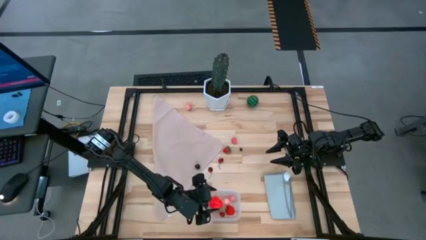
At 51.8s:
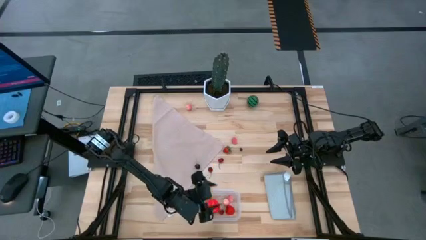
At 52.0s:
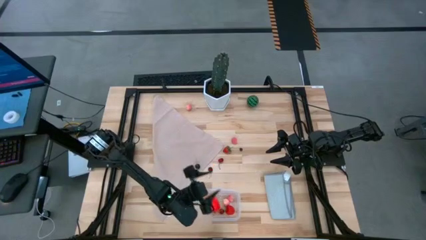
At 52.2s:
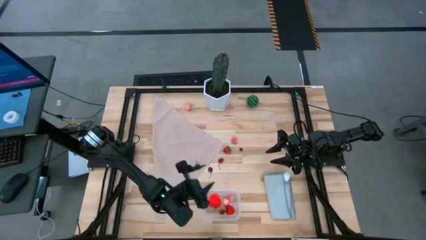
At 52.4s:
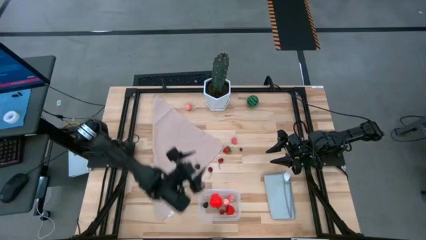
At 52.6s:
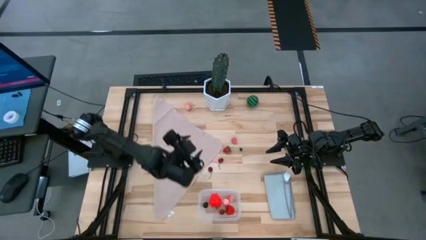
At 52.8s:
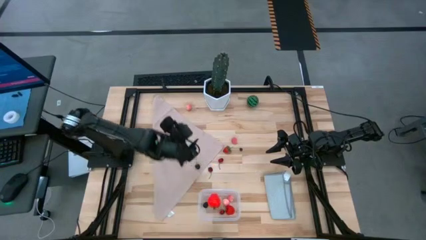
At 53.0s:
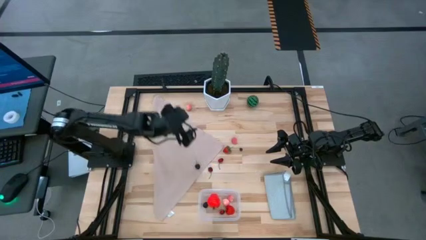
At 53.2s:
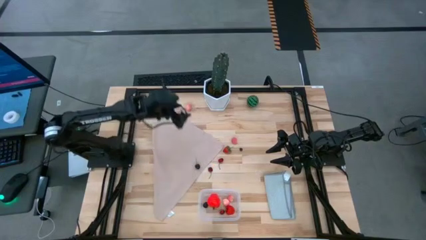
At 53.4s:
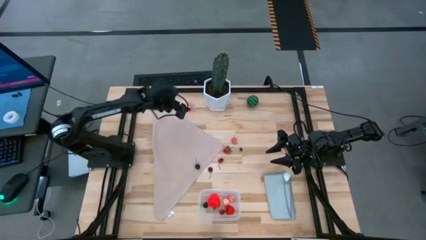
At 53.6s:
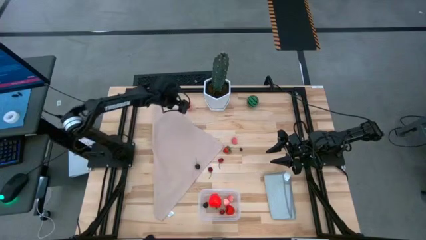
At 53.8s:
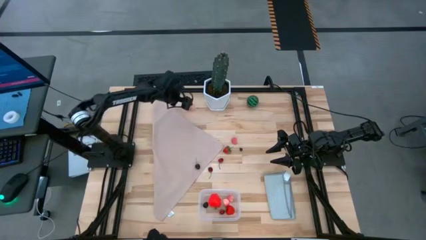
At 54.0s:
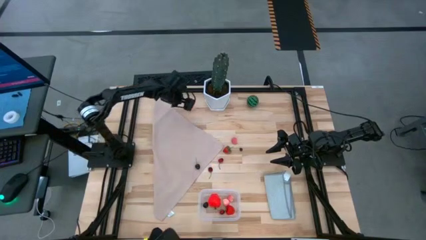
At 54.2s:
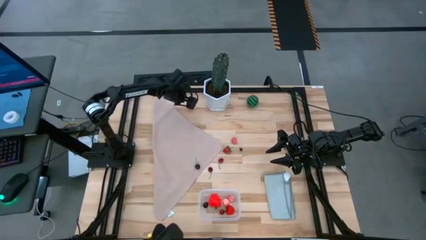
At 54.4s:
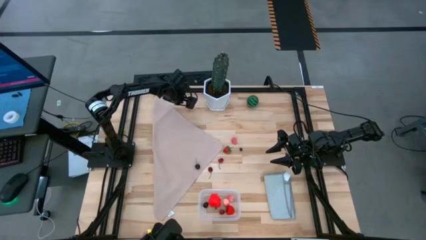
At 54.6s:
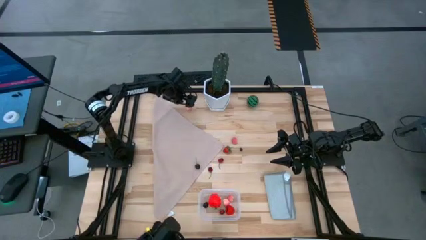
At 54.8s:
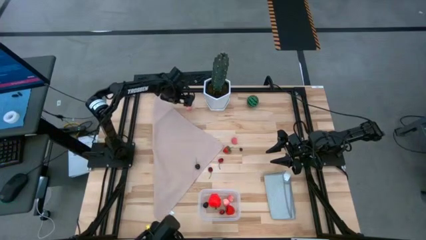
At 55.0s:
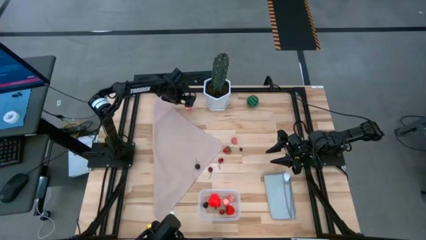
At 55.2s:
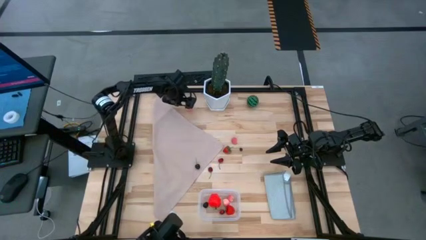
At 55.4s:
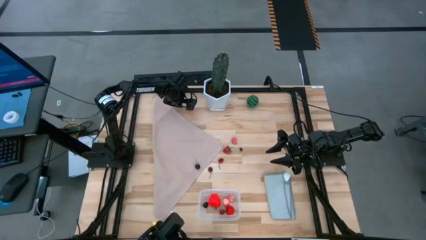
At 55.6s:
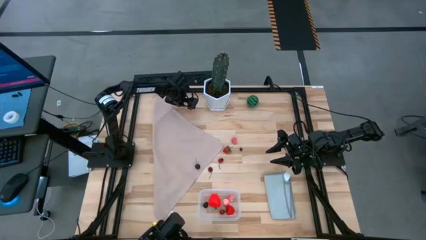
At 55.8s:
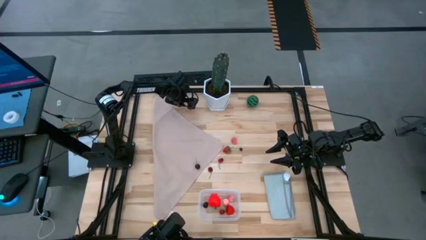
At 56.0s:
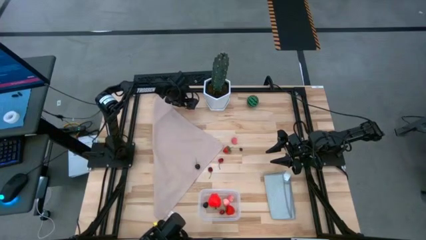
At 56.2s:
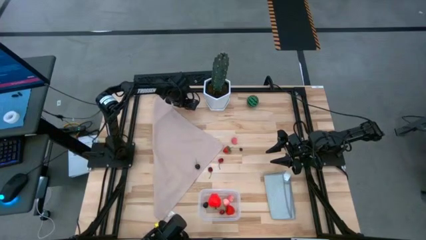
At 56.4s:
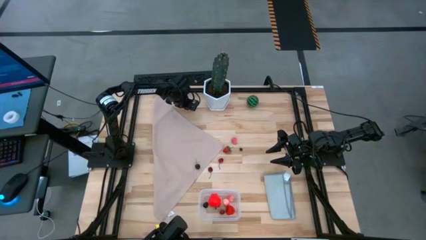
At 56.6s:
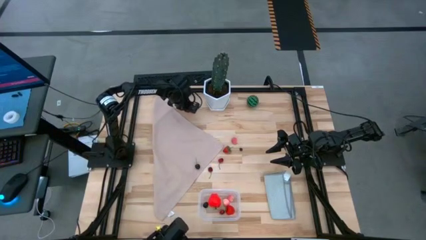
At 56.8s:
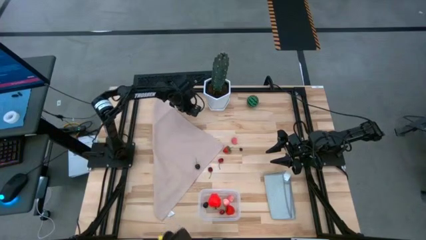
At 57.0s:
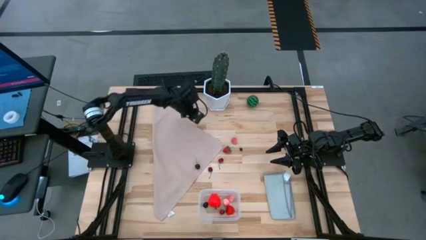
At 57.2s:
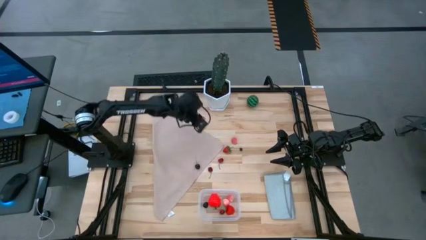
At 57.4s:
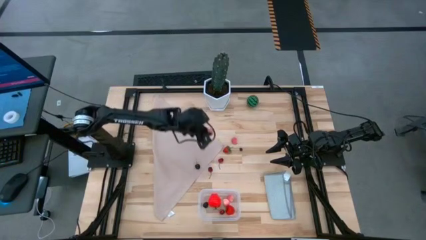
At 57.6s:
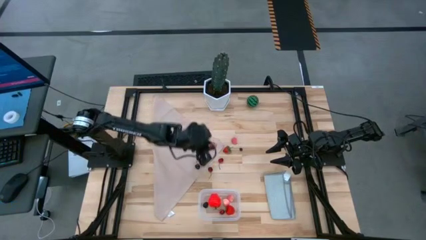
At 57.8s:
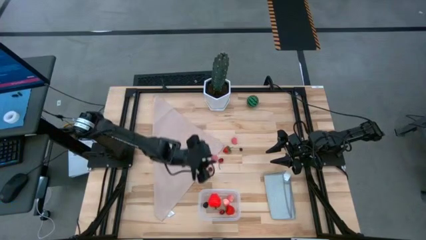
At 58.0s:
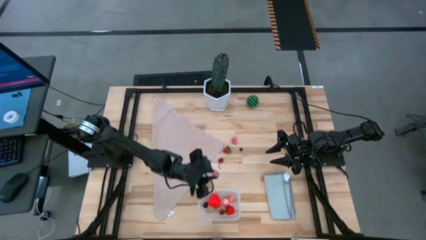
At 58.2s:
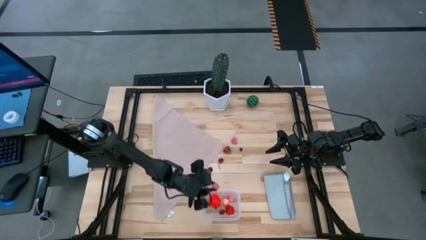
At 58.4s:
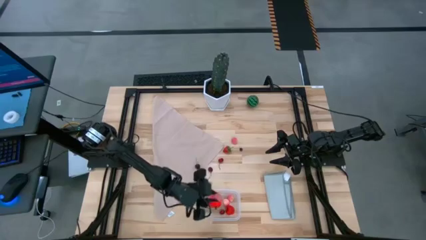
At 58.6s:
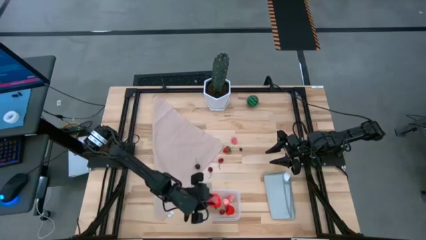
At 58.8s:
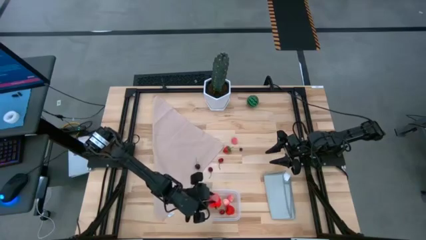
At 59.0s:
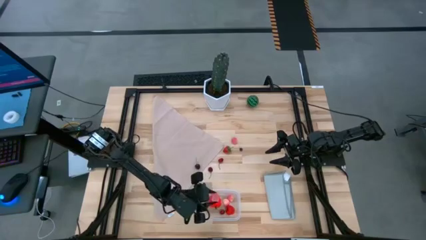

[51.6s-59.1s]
Task: Pick and placing Produce into tupperware
Put the top peach into the transparent bin

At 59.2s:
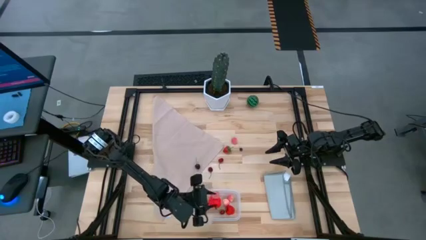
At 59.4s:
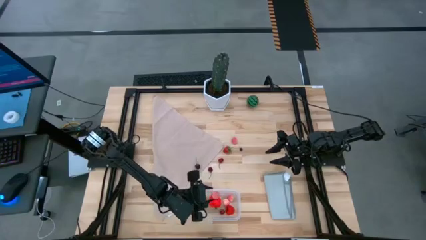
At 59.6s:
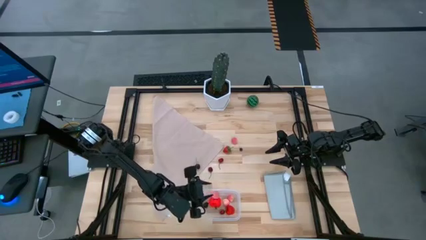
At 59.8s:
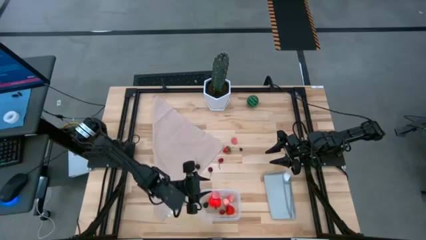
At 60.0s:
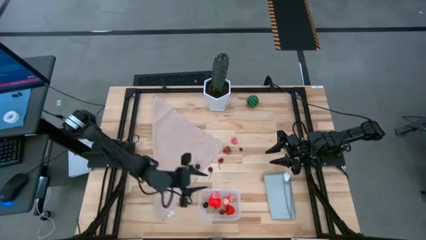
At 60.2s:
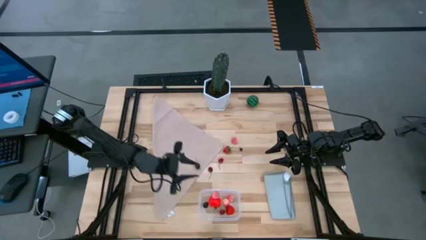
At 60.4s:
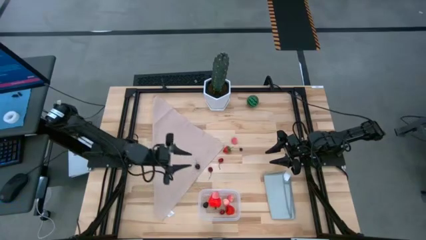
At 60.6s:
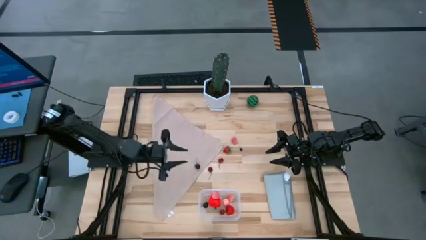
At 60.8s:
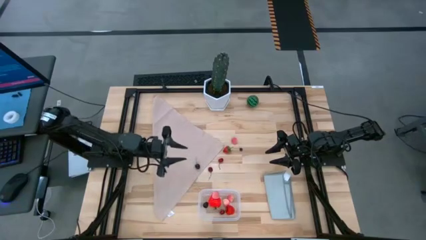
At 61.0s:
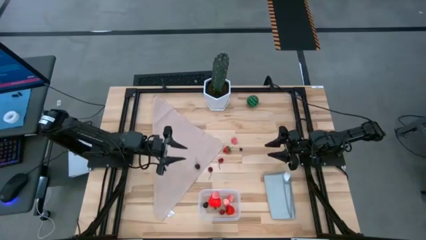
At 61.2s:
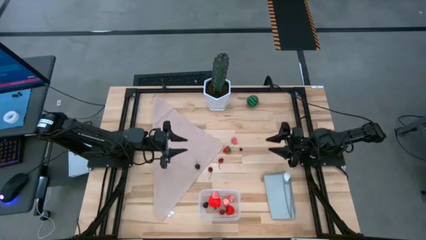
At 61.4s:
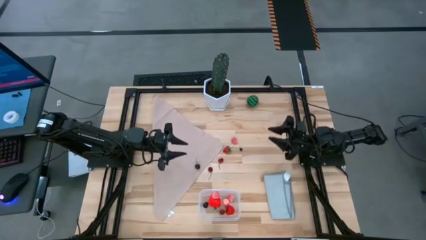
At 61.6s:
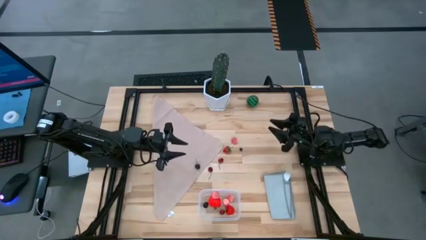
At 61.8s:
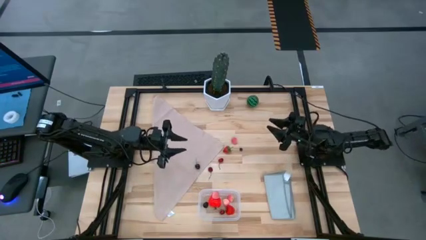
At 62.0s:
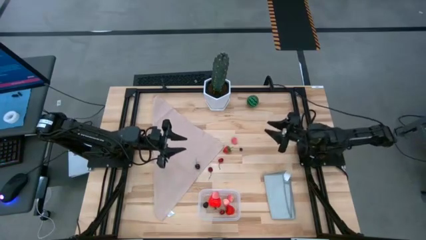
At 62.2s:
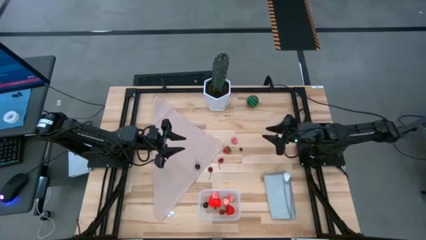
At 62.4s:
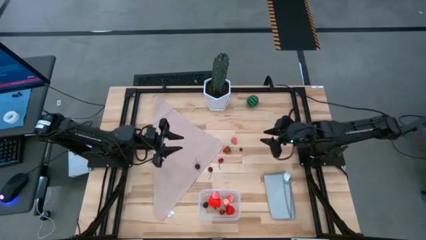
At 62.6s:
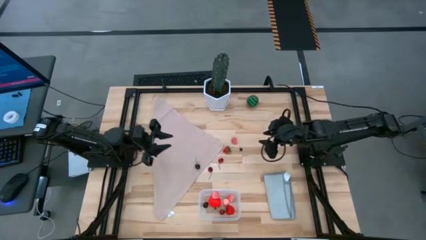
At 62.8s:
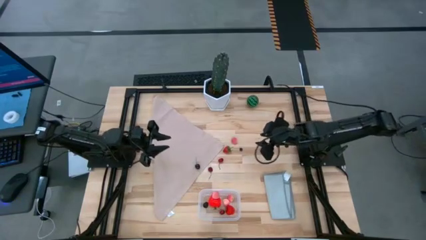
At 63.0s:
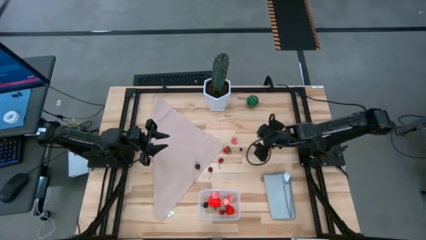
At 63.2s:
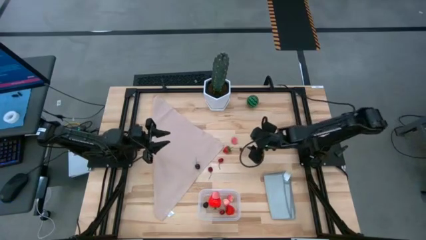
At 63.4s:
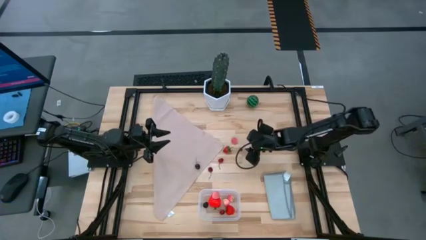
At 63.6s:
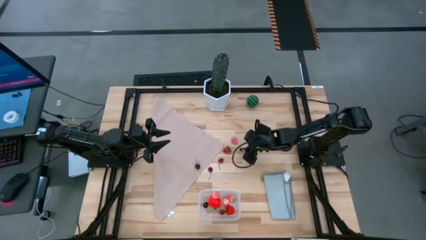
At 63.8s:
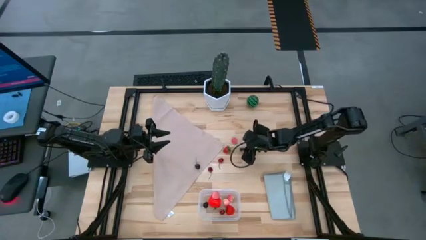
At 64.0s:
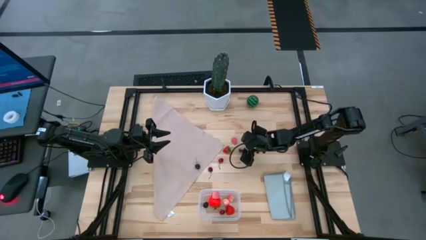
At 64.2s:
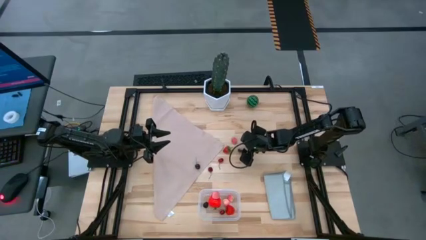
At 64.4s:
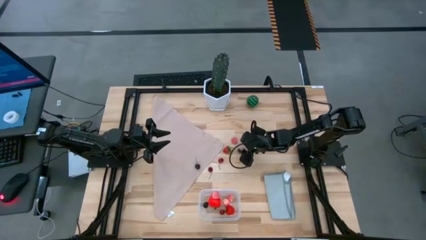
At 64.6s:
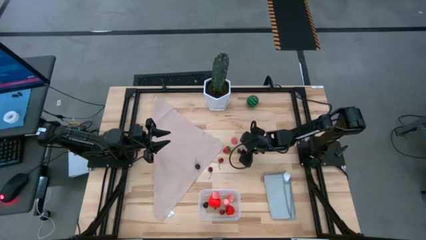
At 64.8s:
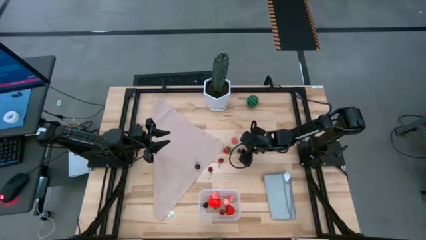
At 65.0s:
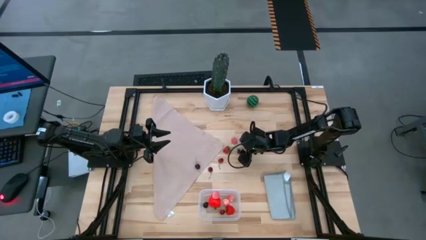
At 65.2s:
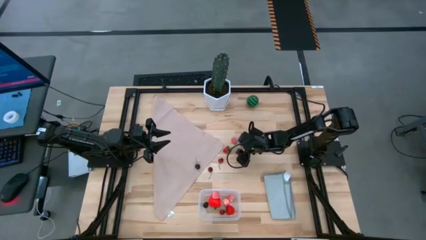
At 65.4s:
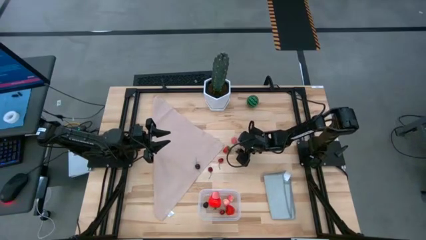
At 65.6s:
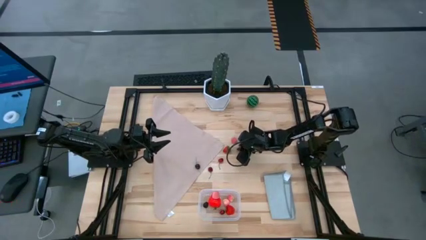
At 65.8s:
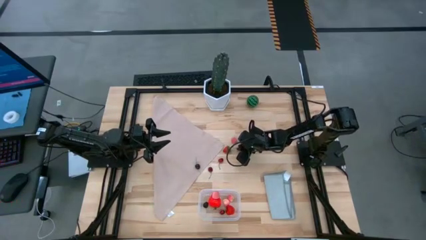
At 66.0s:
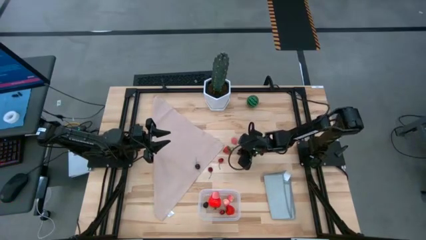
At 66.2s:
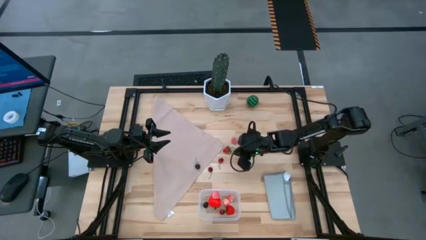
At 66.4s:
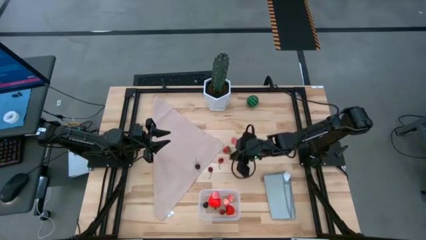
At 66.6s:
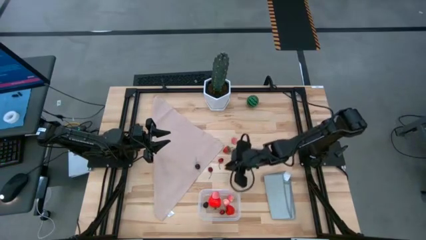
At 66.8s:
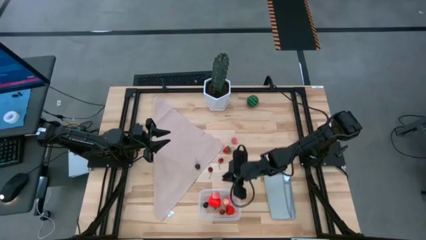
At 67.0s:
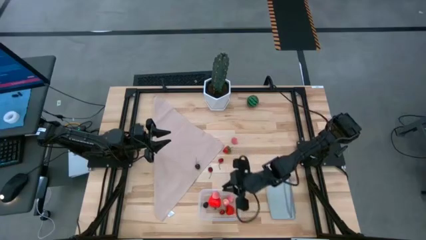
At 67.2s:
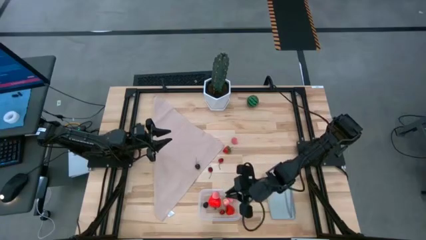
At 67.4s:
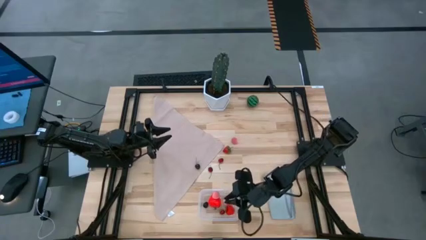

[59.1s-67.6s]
Put the blueberry into the transparent bin

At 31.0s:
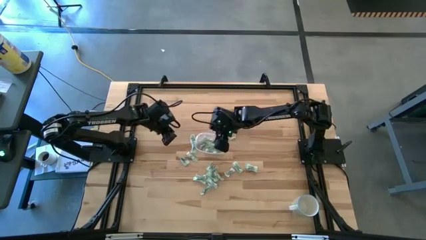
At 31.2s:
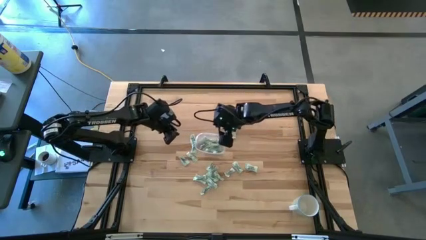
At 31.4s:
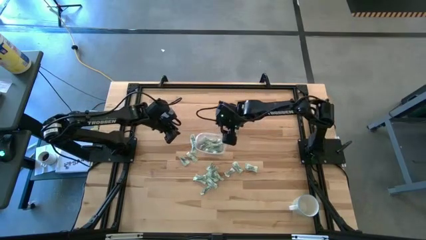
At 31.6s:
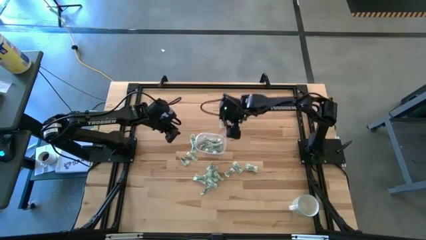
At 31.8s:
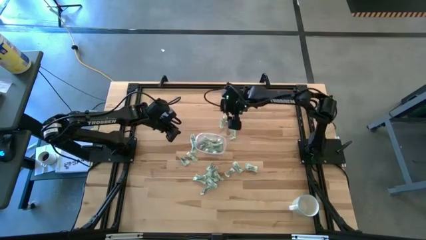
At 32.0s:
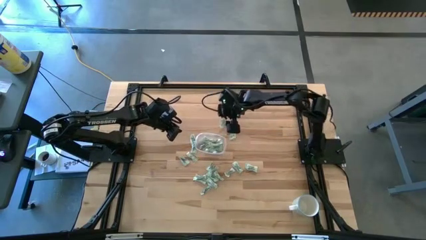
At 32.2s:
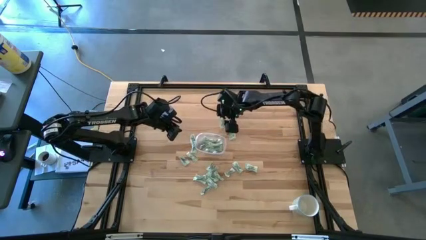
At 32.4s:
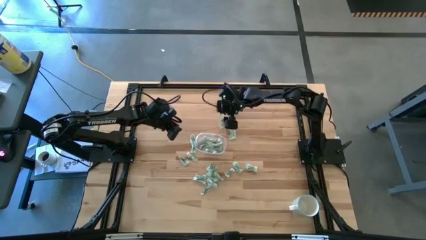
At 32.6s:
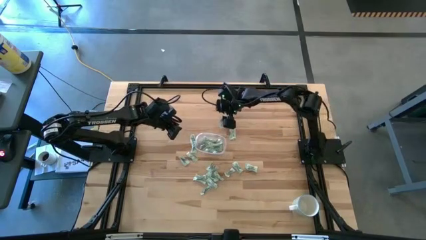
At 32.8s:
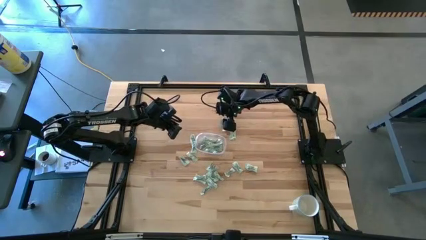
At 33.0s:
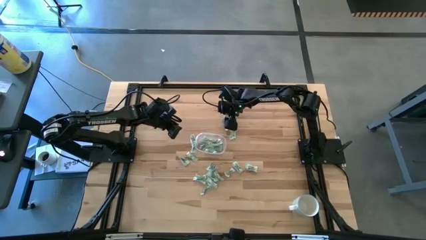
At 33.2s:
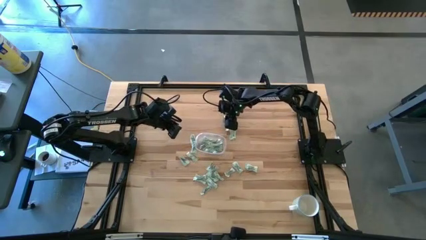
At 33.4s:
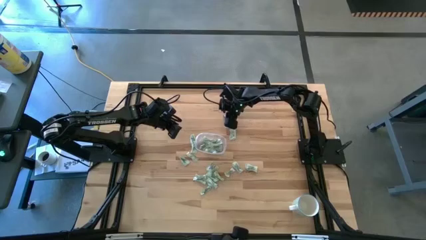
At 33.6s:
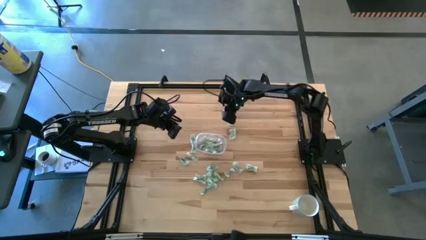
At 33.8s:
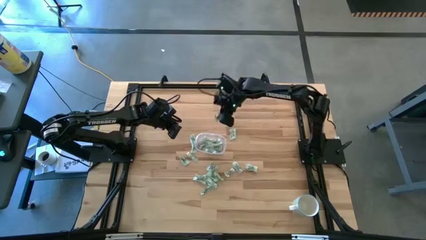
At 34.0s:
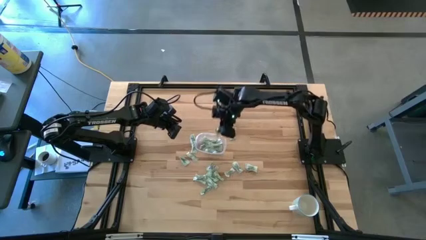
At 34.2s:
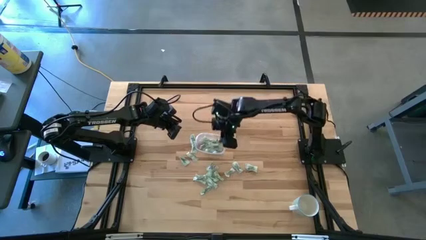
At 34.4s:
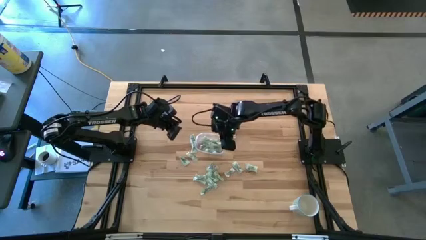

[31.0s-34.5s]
Task: Pick and place Stevia / Truvia into bins
Put the stevia packet into the transparent container
